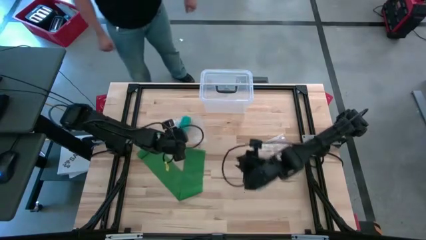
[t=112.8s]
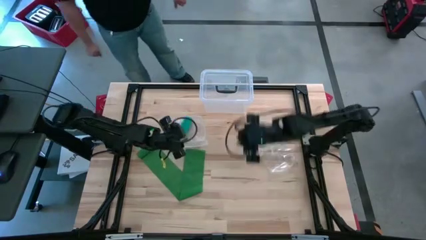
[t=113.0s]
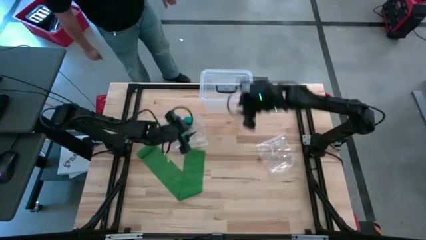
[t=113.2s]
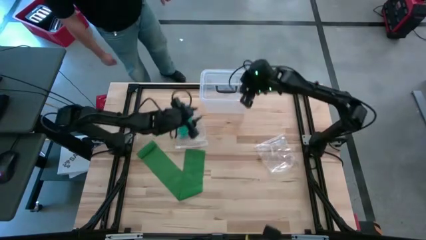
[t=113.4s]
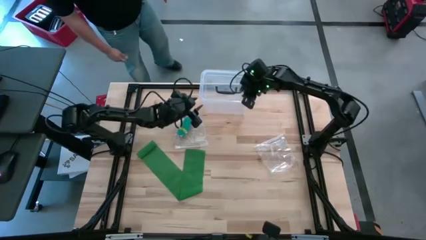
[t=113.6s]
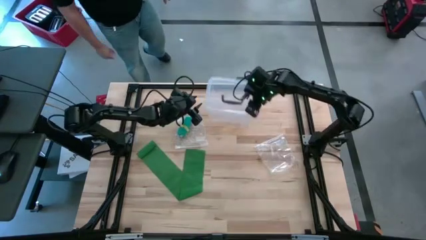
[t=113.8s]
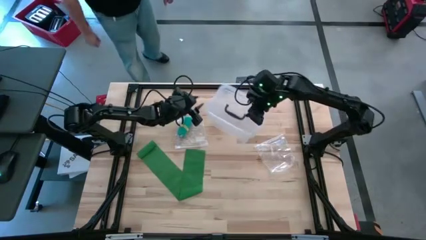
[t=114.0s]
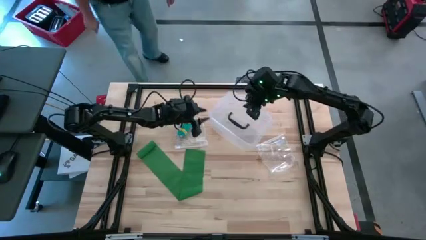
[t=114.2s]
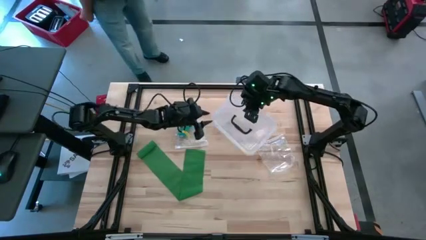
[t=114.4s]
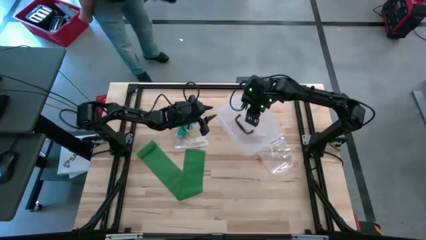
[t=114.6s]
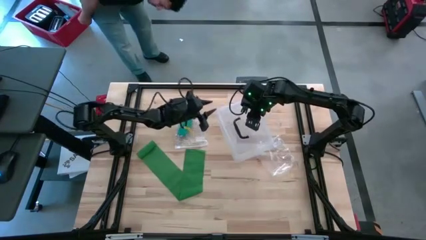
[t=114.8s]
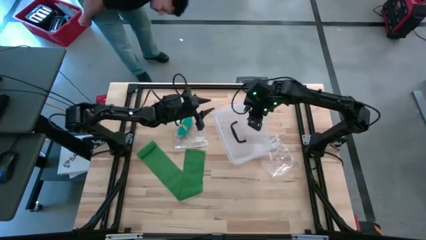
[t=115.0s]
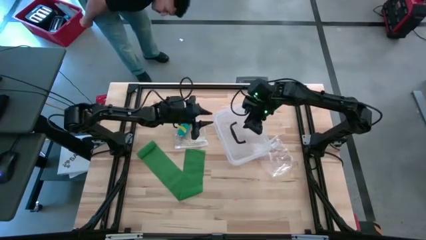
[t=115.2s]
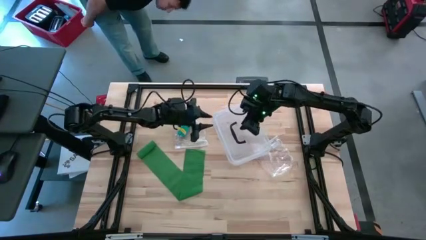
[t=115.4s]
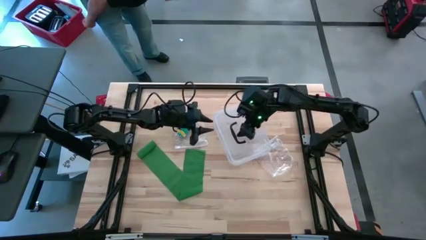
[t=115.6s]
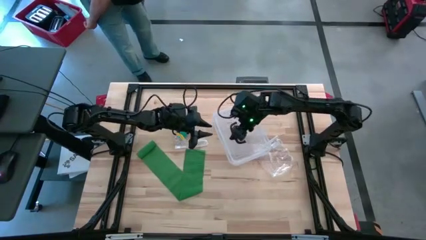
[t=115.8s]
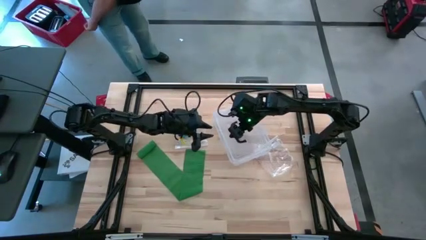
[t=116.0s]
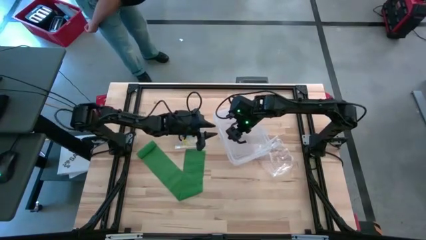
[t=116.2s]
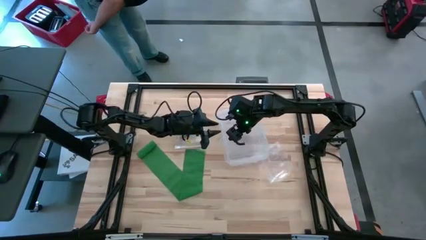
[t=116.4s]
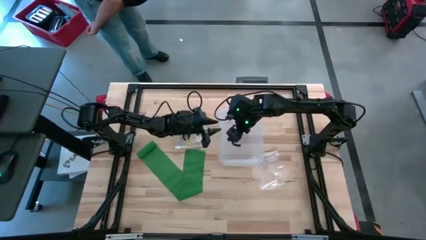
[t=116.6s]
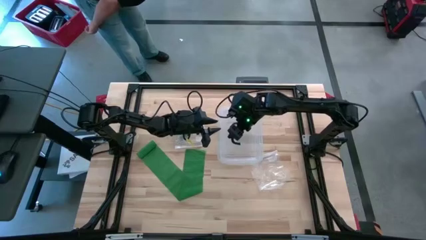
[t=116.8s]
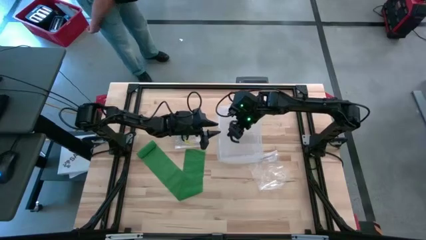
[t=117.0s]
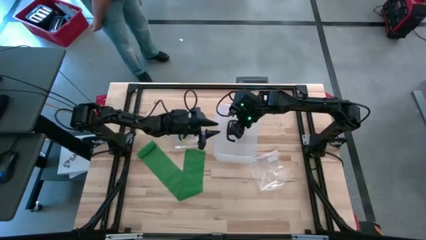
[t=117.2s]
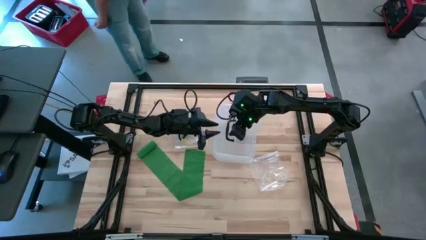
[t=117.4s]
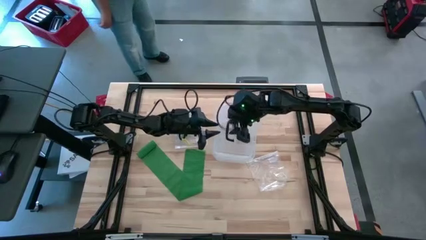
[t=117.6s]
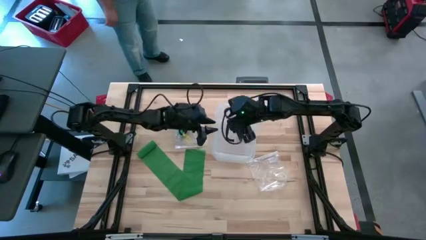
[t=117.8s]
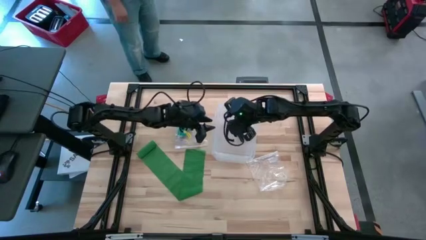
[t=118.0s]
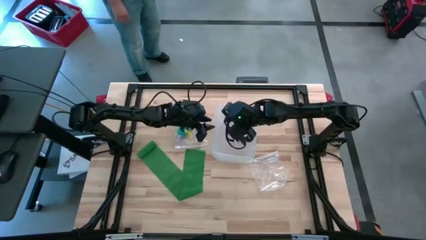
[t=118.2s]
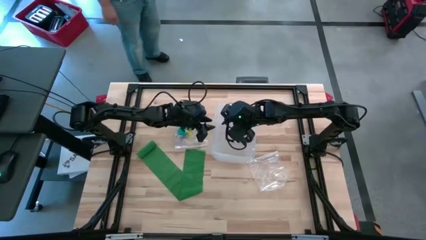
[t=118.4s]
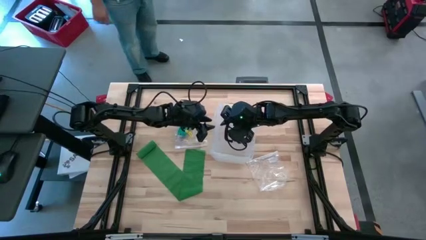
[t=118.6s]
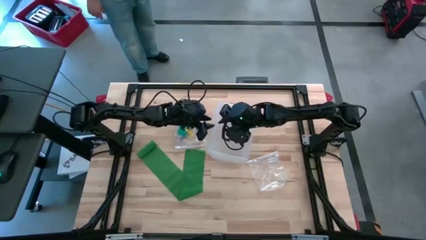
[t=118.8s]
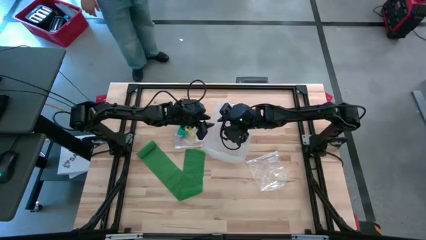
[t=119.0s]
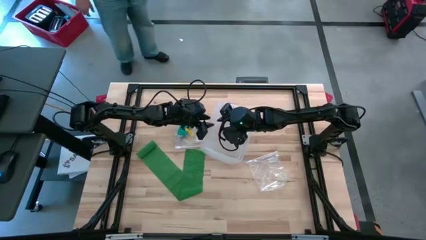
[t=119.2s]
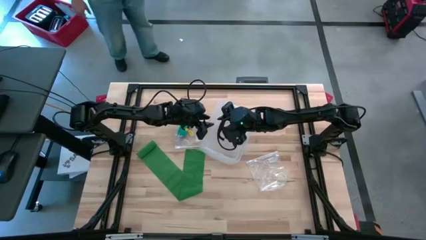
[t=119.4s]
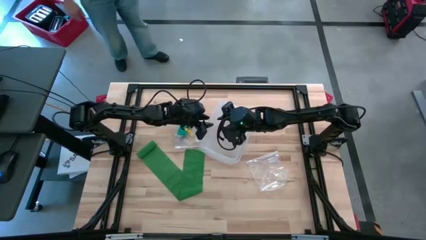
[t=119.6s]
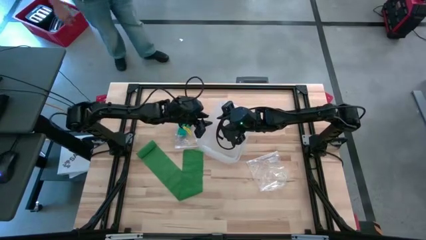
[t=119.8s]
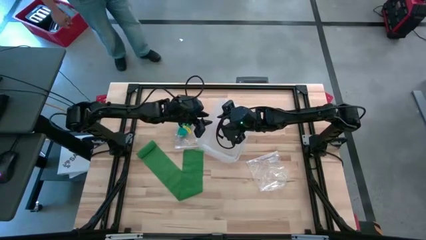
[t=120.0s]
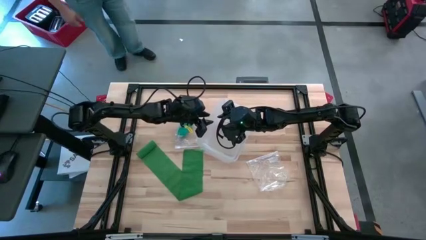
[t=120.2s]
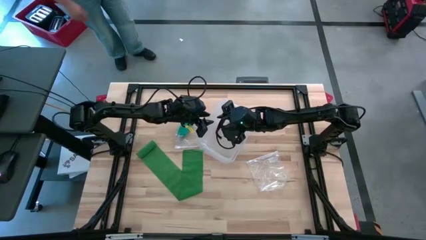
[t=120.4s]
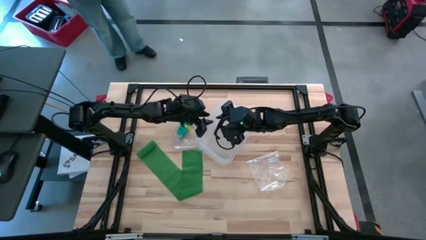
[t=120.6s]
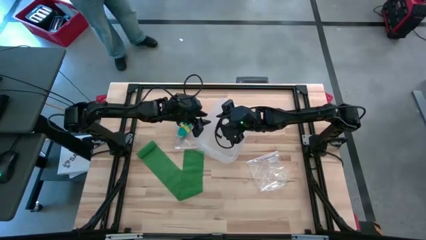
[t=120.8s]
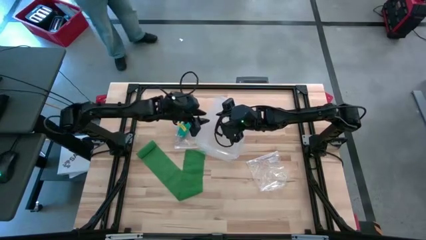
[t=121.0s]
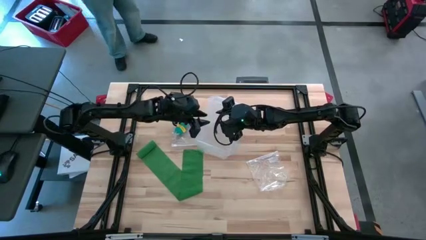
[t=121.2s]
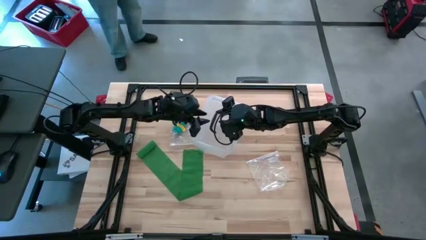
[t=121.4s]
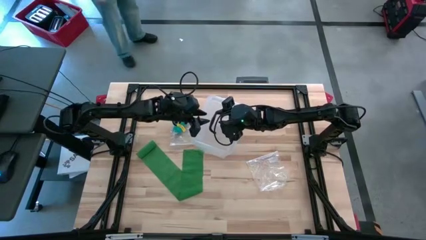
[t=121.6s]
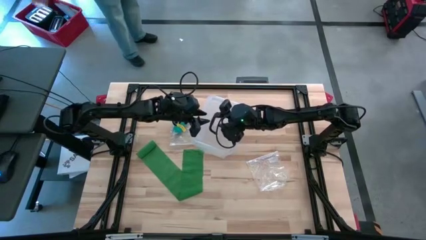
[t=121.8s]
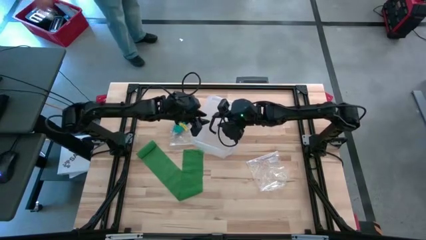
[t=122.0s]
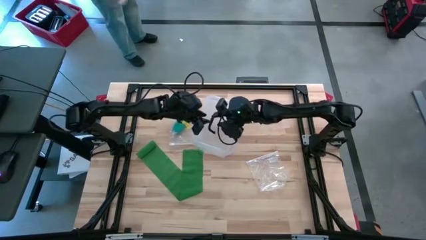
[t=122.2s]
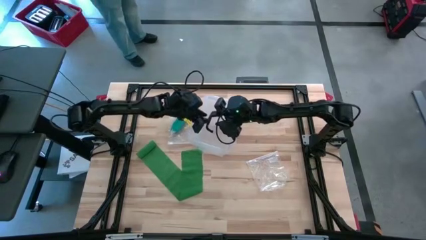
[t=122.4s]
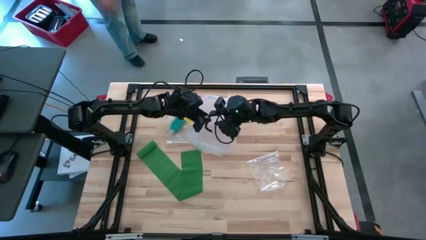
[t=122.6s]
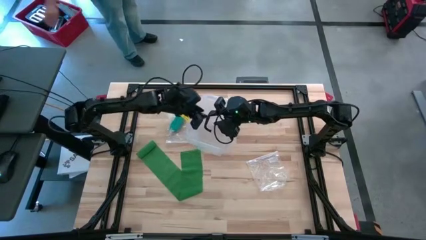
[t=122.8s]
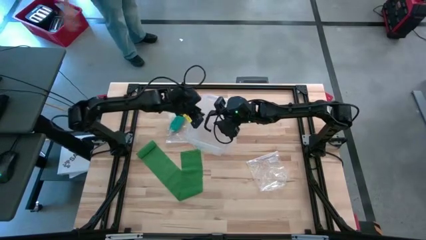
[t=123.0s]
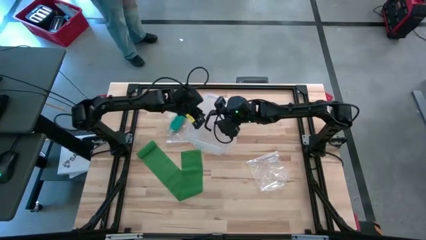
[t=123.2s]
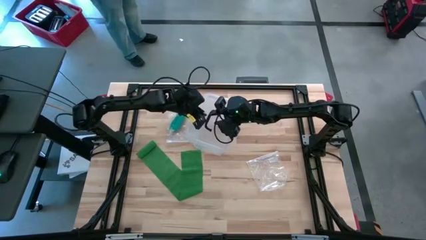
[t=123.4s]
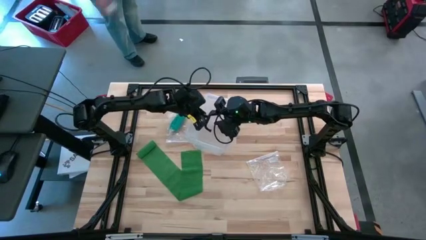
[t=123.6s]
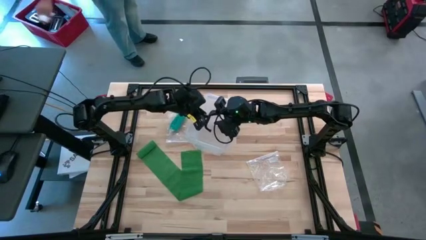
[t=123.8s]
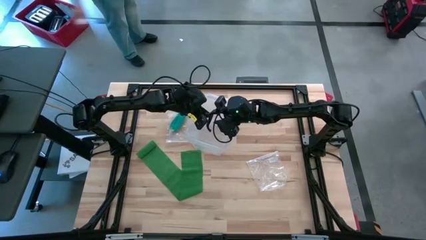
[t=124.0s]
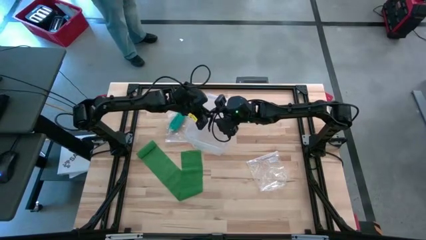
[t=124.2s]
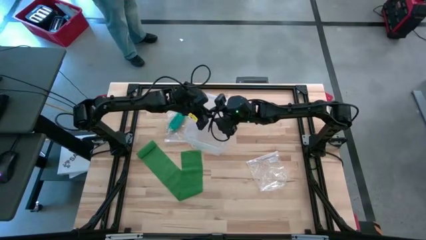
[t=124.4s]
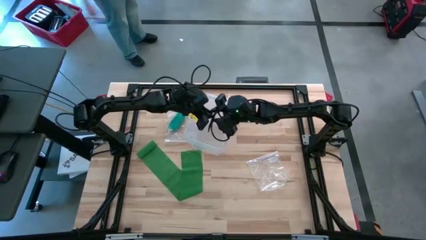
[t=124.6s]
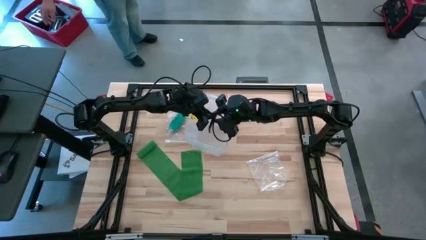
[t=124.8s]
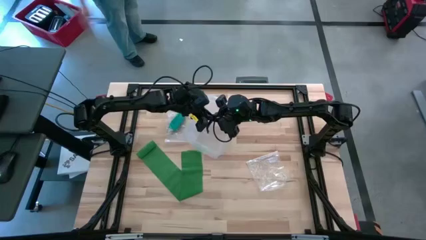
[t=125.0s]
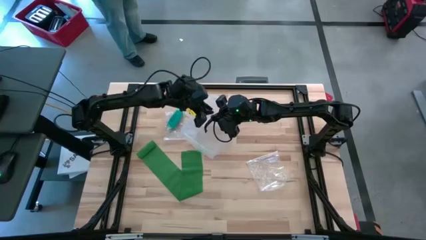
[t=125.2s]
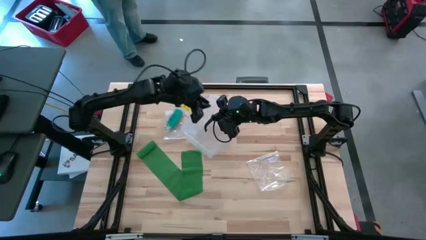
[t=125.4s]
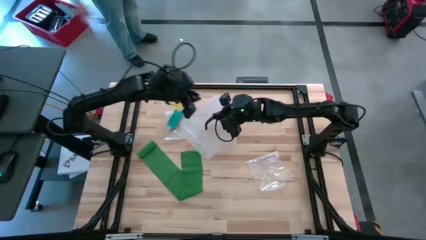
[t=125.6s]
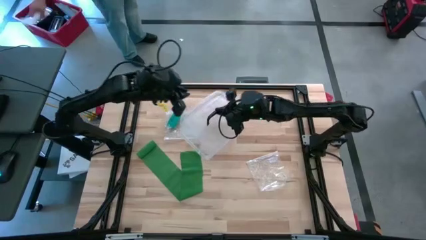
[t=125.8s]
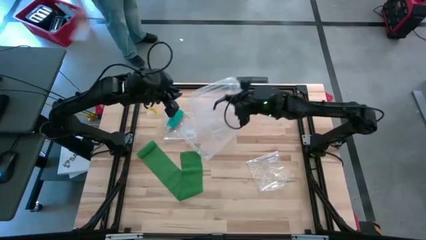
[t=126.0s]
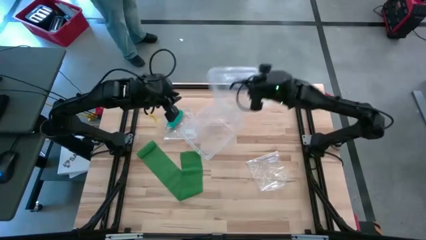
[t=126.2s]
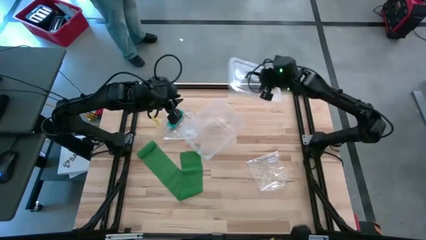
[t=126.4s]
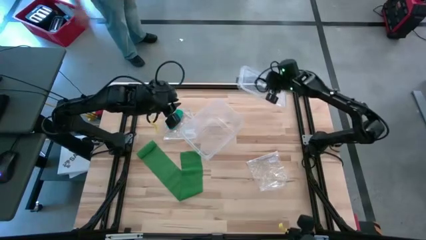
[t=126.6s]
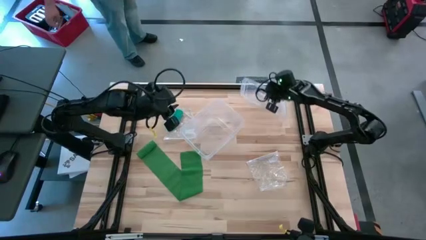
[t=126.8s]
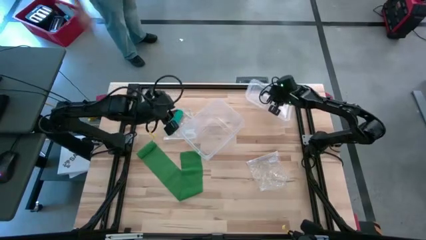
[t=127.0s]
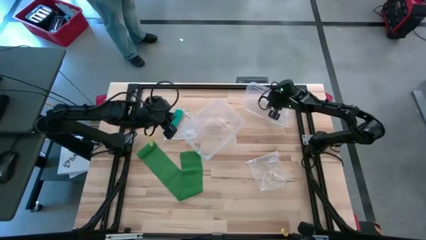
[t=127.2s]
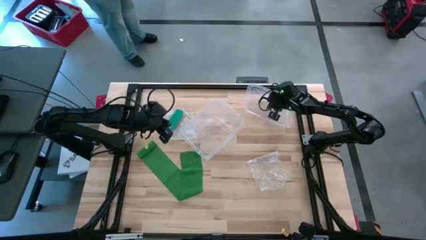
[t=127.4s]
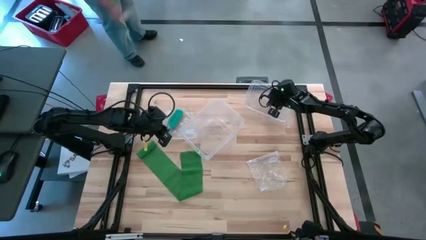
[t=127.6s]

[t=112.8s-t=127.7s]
Task: Roll bandage
Open the transparent storage box

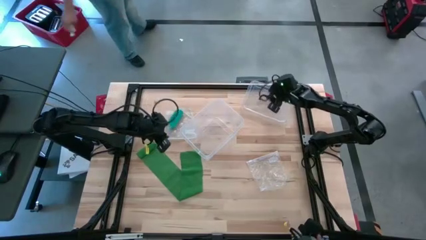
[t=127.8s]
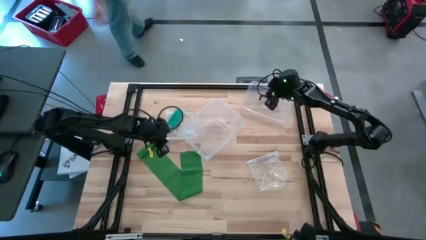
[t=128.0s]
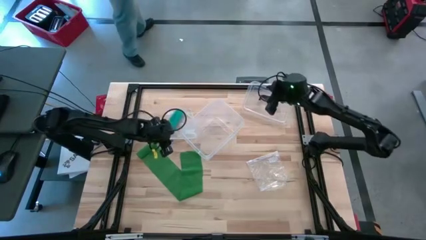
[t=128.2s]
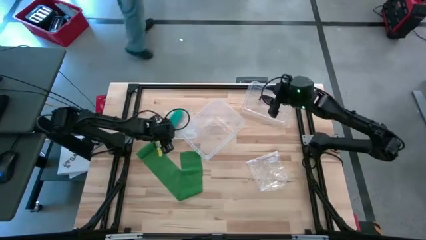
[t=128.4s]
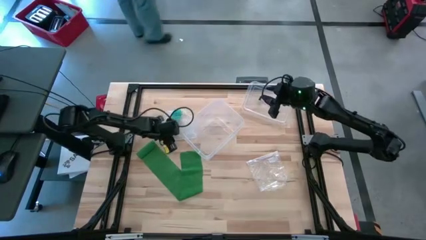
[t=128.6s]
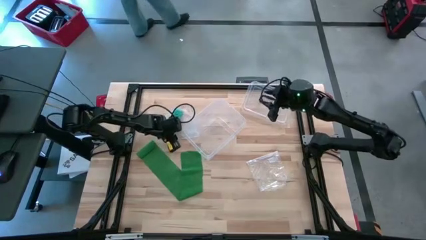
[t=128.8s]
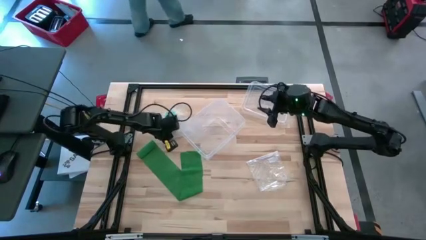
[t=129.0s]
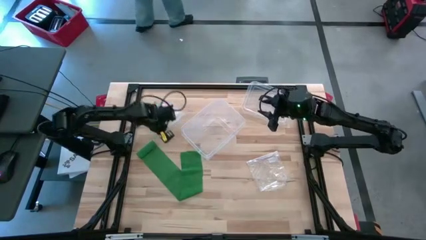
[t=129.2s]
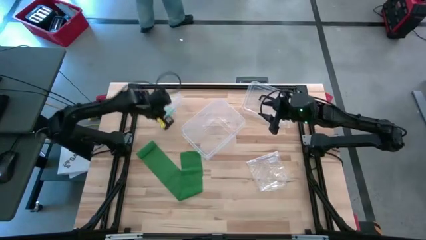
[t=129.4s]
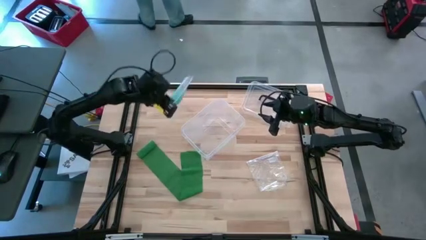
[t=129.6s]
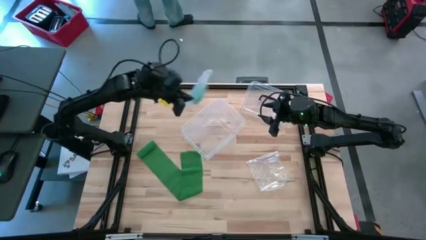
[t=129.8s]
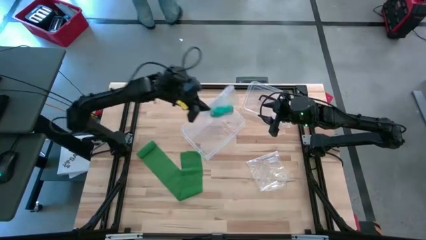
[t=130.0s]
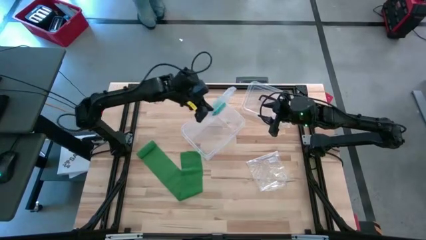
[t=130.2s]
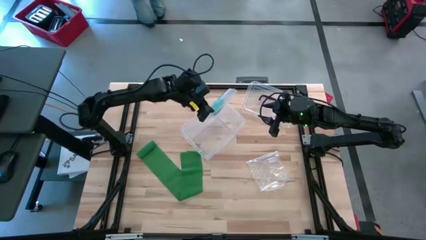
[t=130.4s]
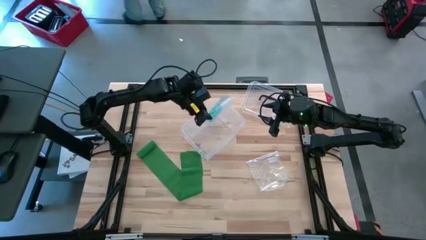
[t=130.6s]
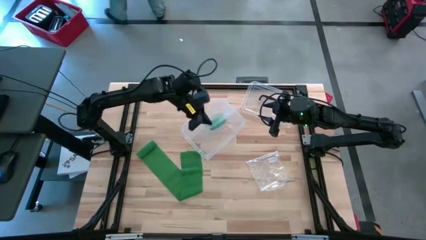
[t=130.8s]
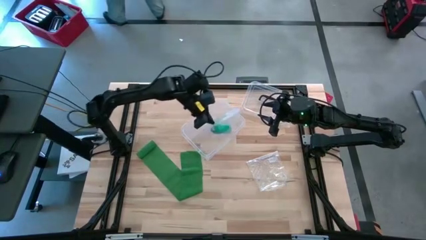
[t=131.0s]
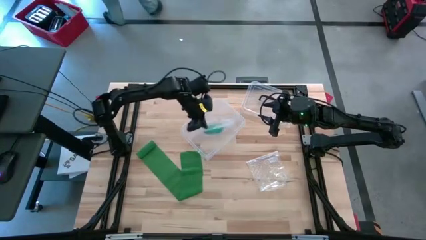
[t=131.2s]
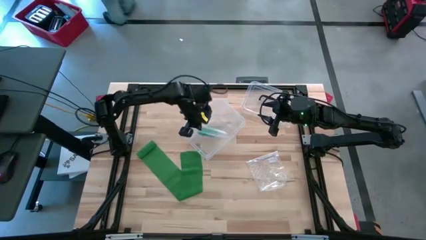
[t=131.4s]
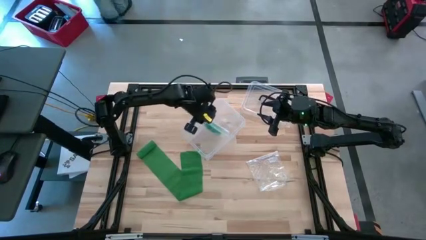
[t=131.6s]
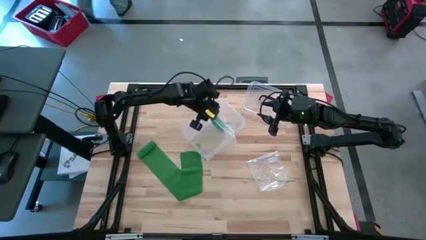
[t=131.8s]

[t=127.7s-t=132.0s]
Put the transparent zip bag with the blue bandage into the transparent storage box
